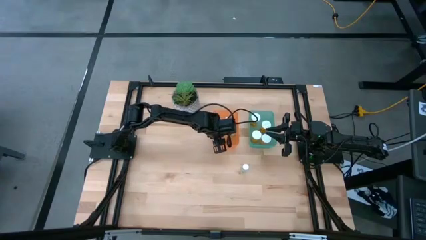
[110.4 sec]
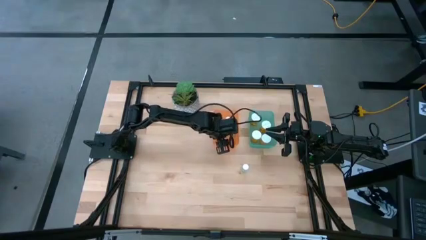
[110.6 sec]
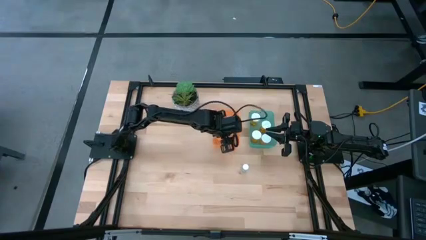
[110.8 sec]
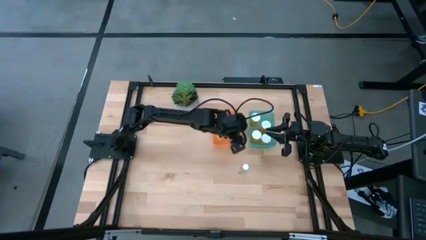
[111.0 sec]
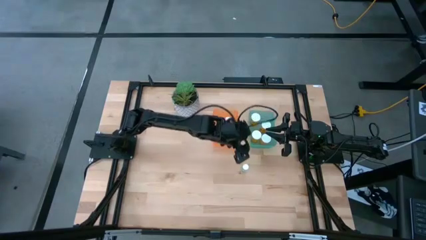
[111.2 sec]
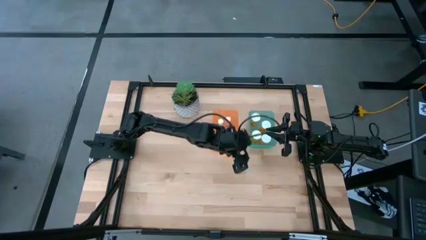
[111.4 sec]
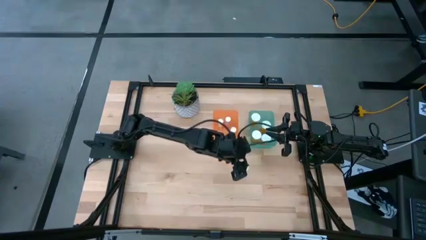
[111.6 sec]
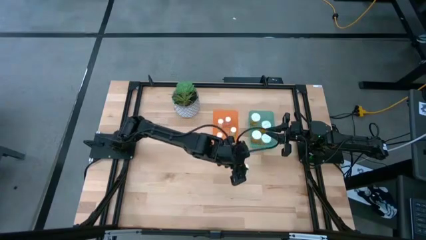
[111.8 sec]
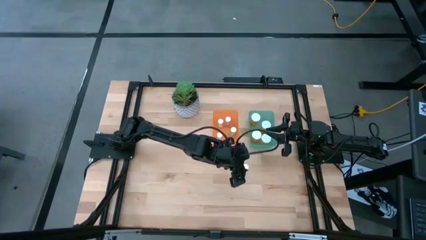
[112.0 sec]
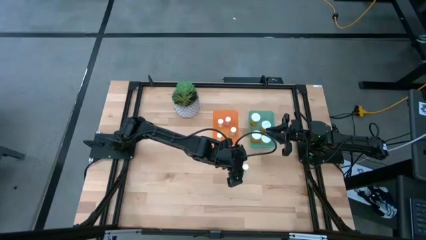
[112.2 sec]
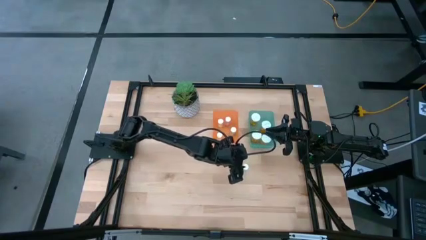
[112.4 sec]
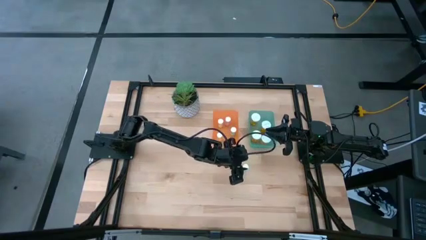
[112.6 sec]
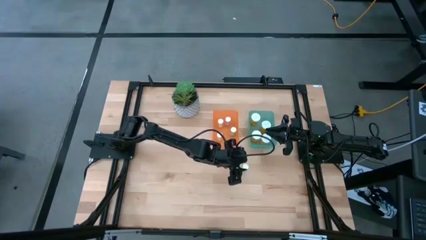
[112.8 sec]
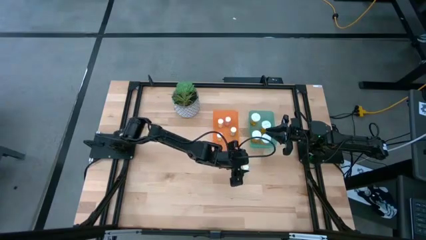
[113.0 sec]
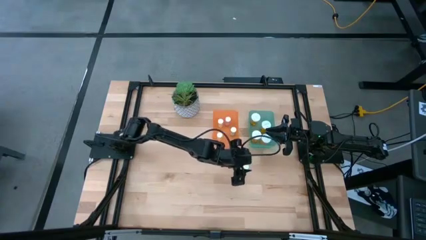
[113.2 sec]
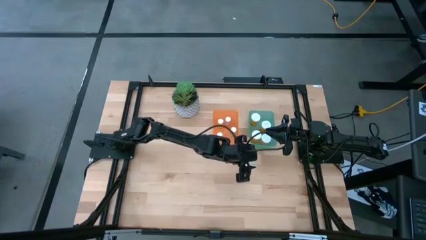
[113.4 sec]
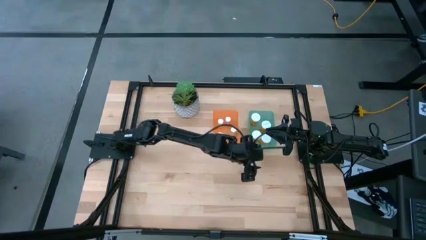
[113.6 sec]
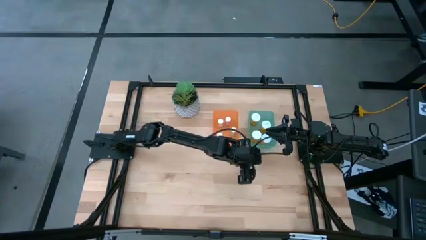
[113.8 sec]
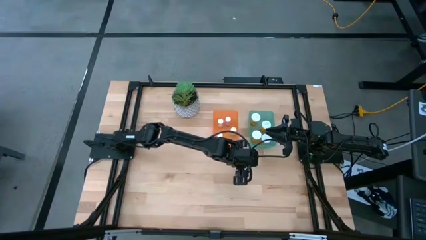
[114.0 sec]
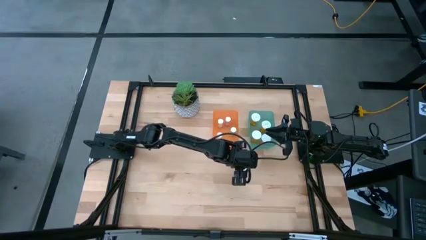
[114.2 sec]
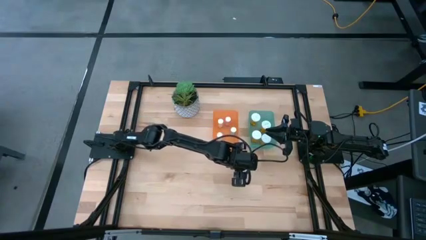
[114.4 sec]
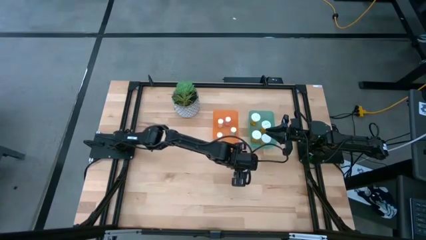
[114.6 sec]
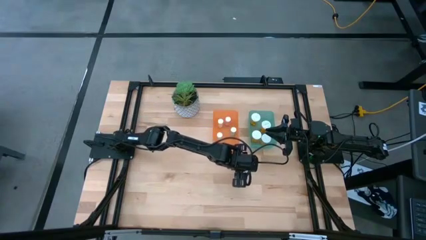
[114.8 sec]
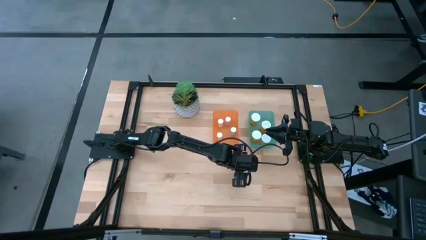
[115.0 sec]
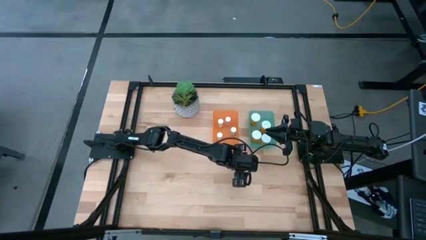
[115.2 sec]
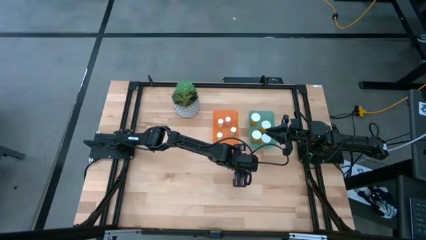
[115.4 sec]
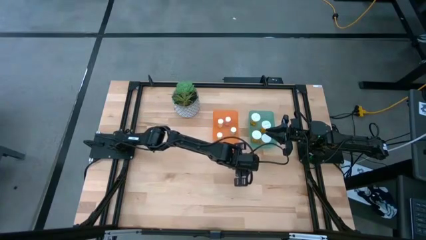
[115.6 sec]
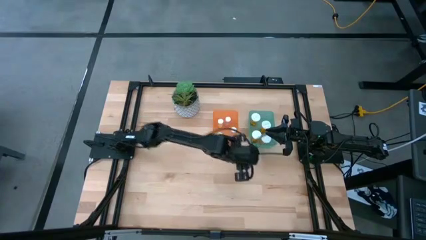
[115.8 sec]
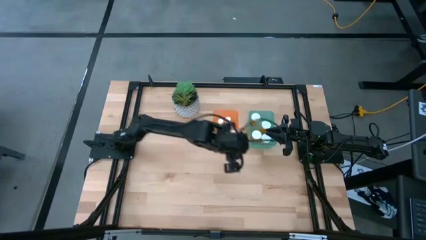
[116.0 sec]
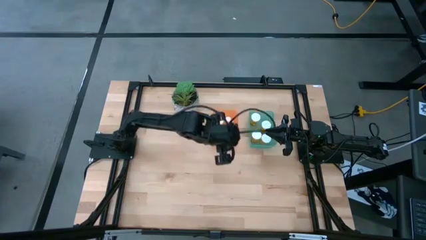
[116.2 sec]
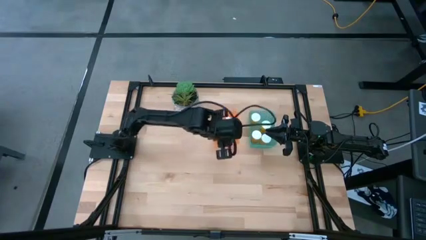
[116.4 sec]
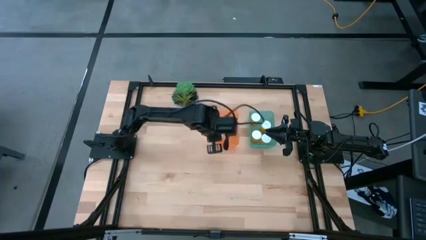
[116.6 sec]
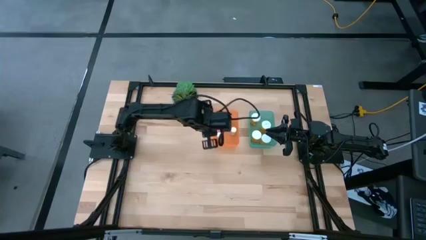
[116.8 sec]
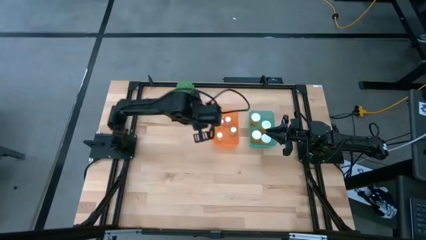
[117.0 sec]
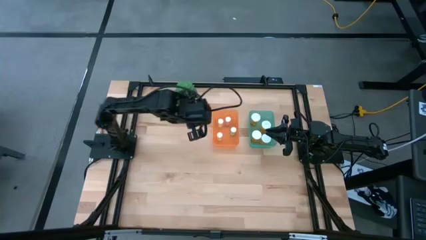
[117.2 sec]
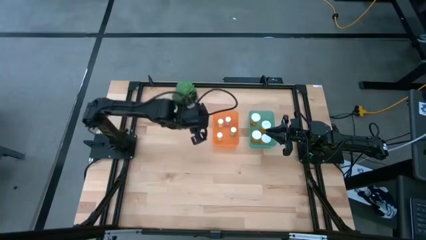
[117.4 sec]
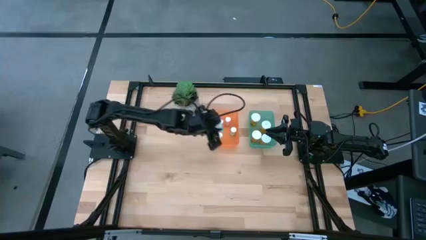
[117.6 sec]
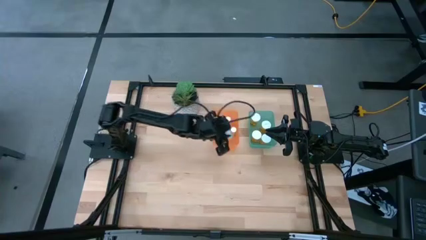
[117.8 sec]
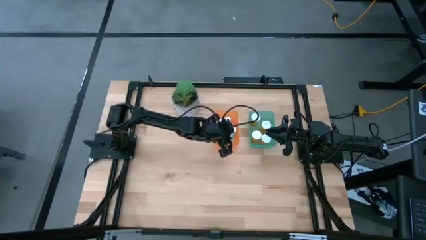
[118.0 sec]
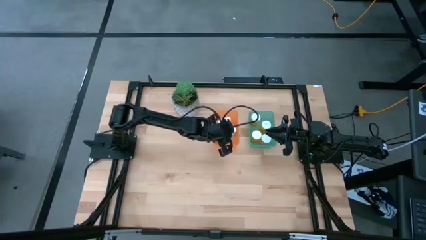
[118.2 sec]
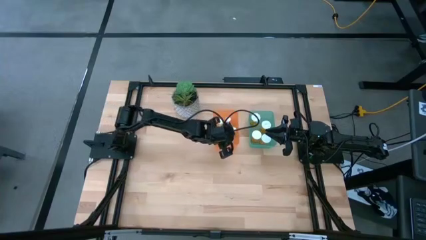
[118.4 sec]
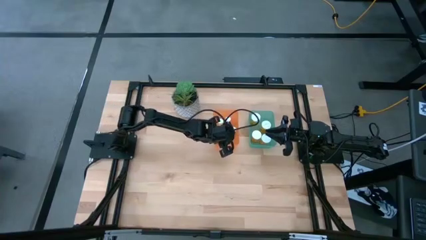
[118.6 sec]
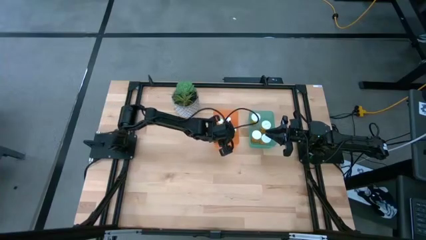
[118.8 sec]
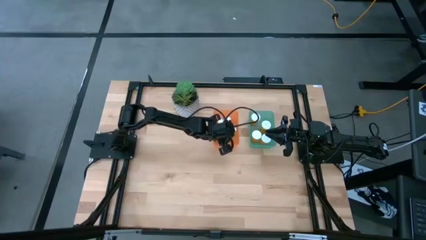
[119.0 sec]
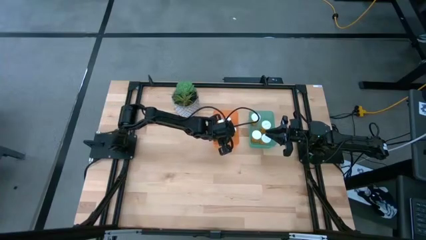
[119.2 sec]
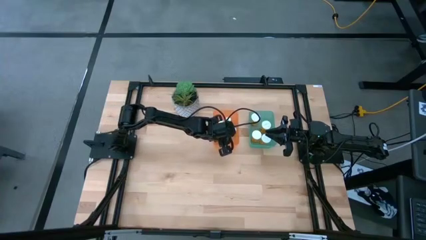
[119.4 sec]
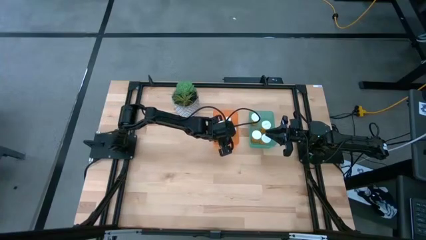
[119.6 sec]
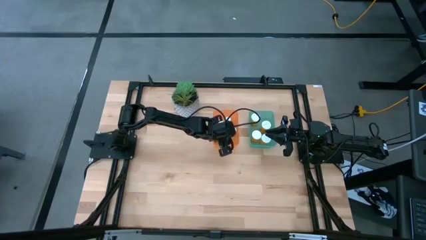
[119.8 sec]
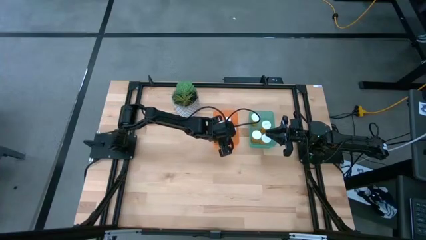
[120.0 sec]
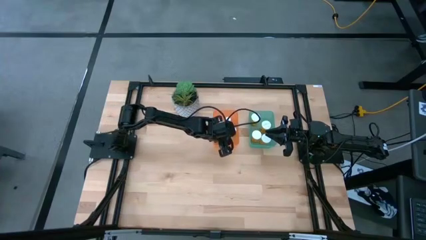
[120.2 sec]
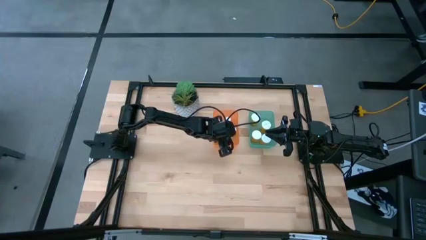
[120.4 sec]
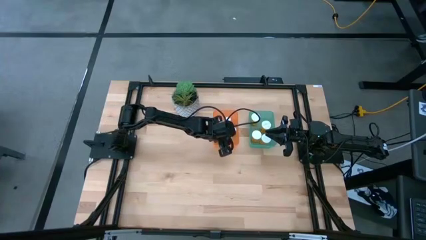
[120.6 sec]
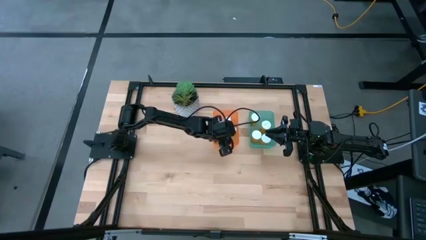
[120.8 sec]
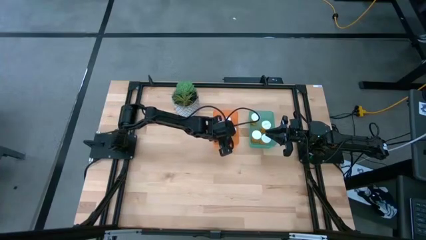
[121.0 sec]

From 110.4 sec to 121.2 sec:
Task: Pick and place medicine bottles into bin by pill shape (circle, oval)
Put the small blue bottle into the orange bin

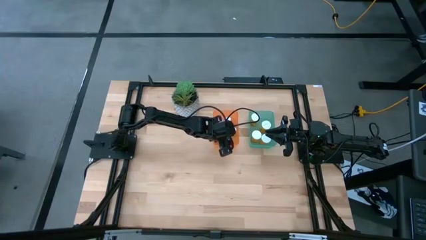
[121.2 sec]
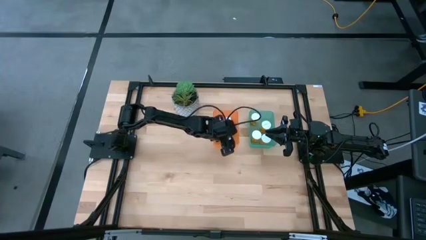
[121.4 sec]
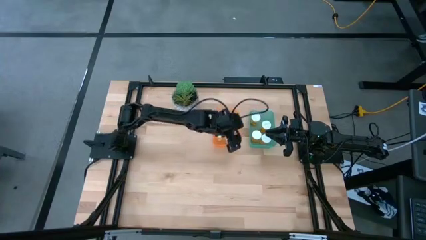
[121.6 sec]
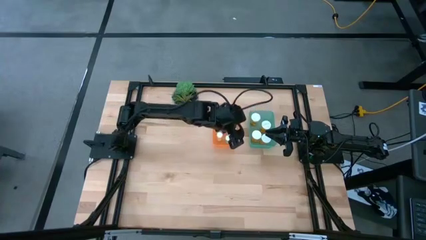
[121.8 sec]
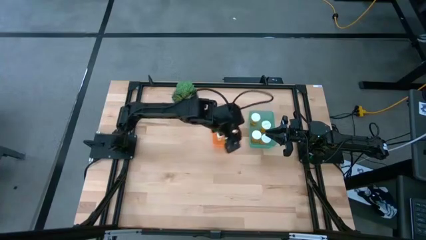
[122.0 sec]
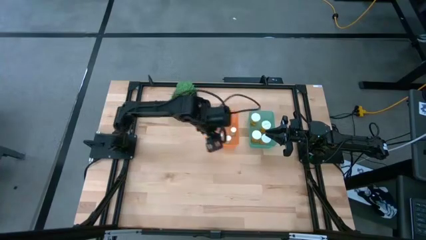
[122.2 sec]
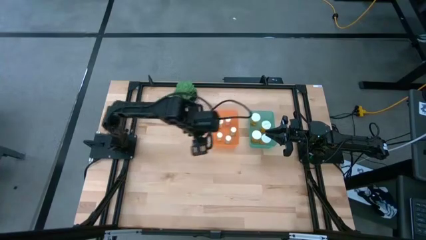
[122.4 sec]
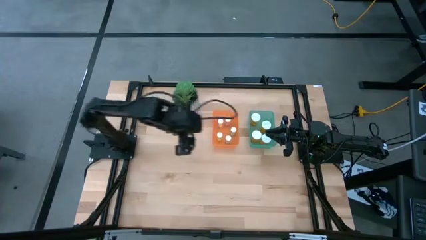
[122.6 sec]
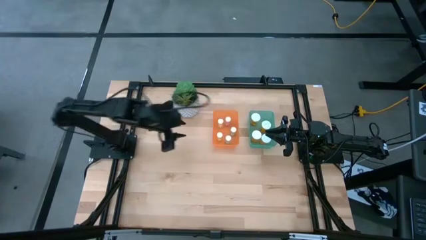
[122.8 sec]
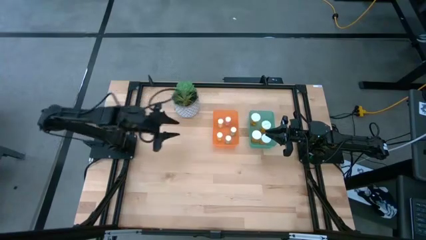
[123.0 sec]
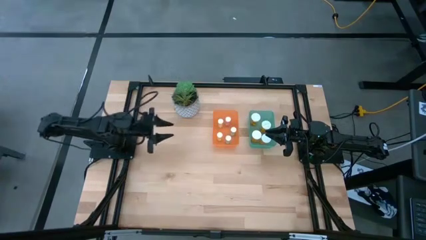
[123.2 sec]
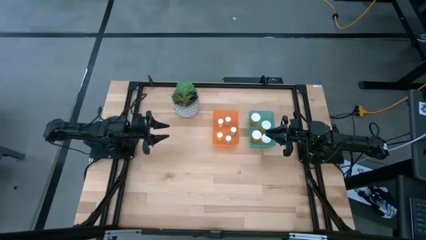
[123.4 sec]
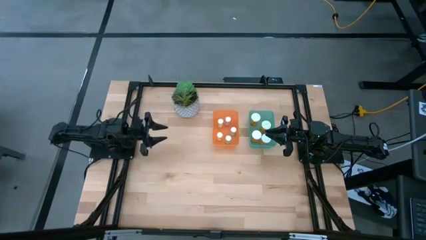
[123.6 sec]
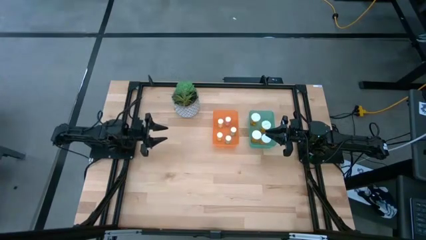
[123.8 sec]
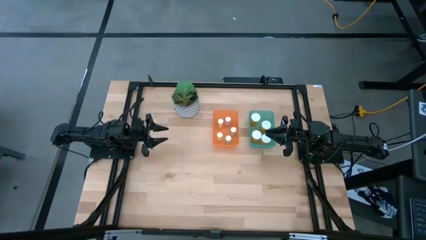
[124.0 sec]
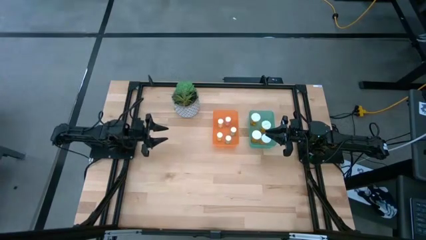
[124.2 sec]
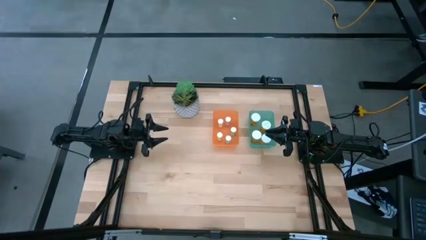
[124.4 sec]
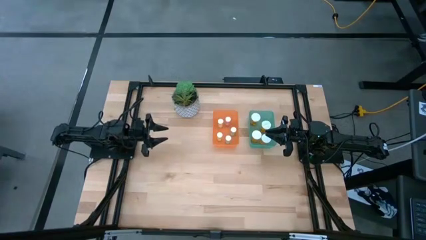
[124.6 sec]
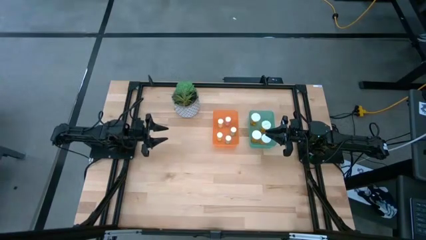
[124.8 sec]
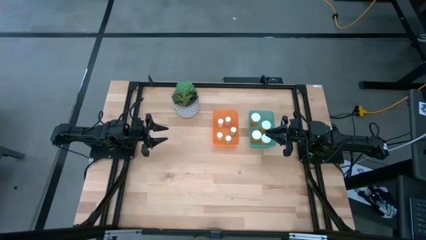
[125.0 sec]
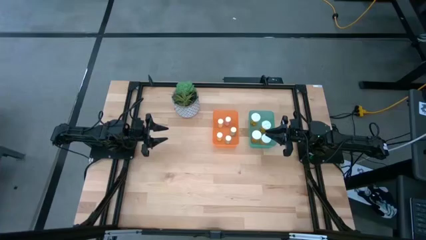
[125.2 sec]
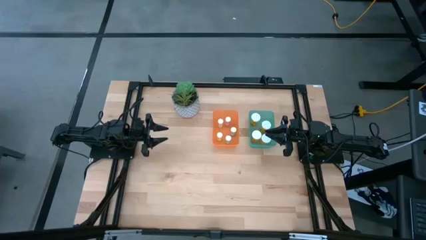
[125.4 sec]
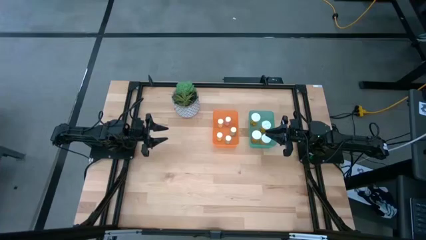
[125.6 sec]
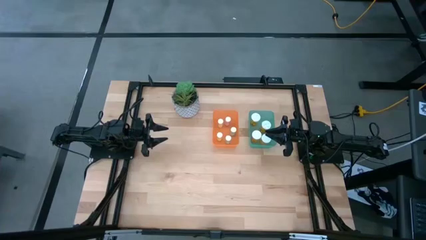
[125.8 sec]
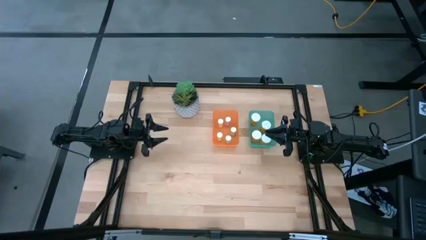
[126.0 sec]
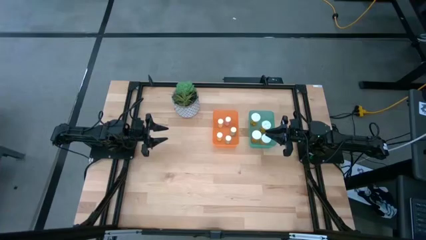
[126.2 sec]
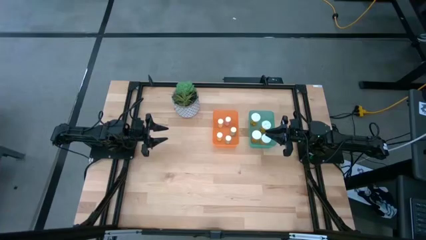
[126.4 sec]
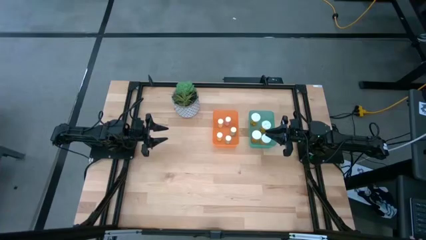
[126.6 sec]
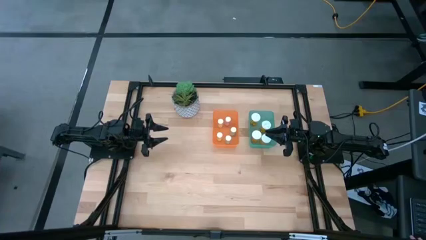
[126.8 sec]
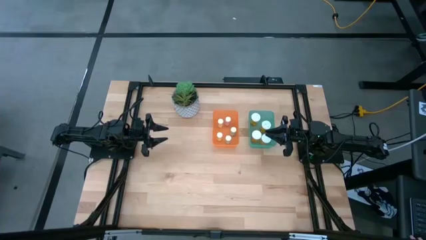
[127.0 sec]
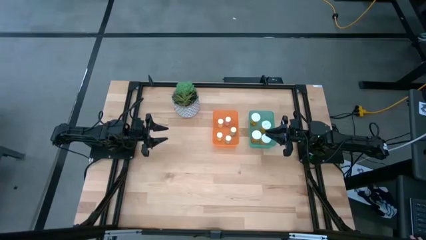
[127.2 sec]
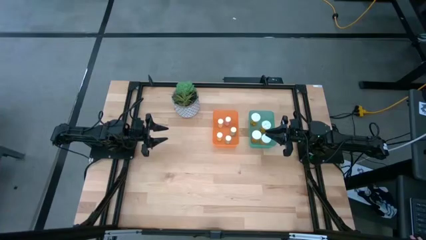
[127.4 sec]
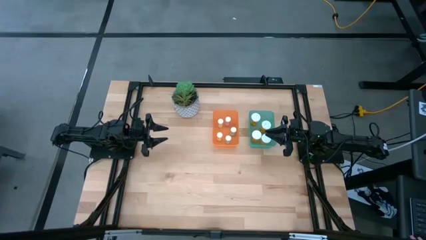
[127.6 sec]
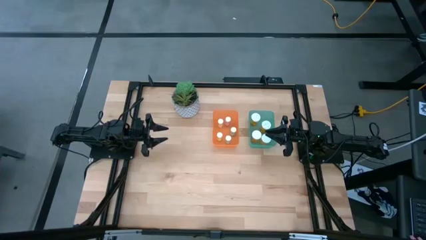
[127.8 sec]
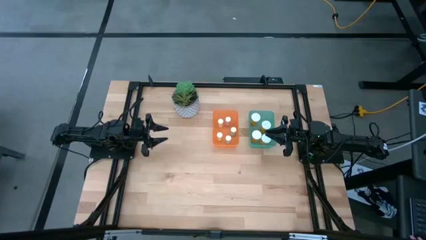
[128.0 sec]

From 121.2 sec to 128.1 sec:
Return to Home Position
